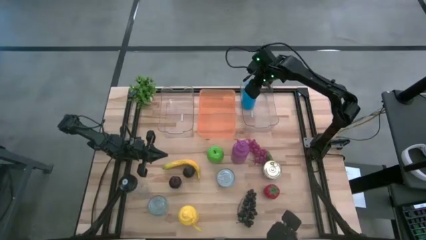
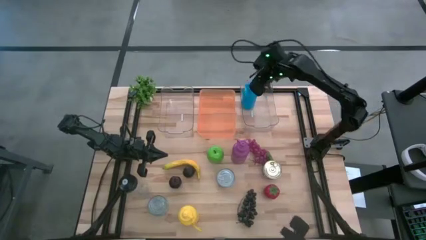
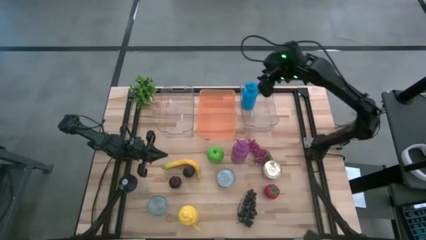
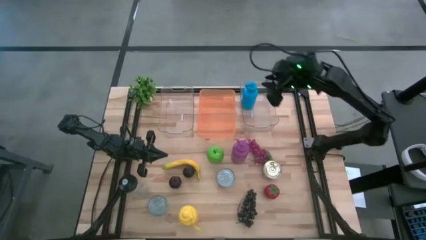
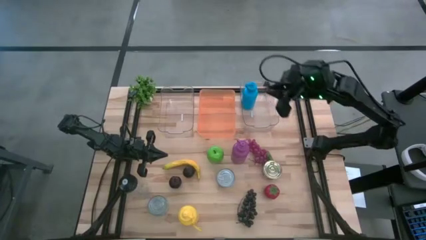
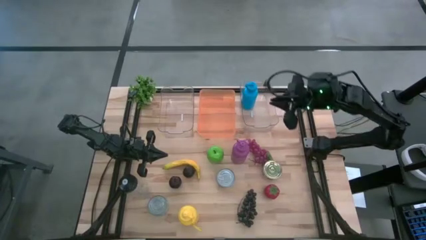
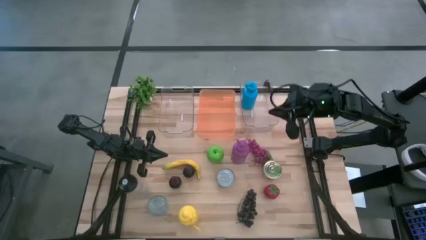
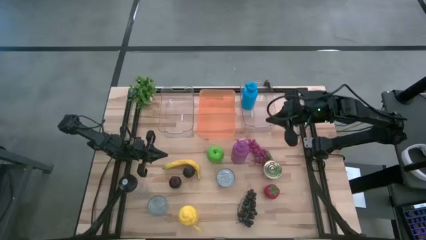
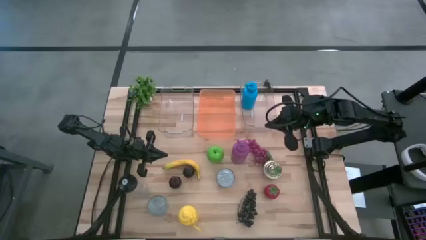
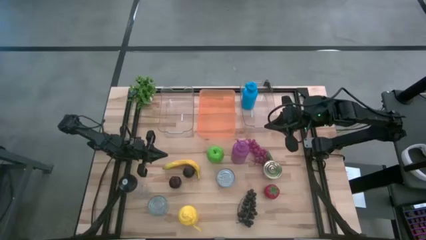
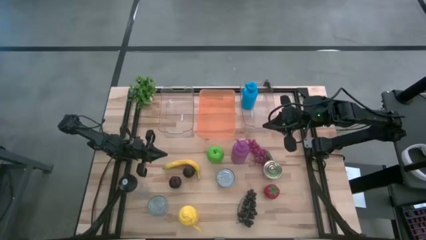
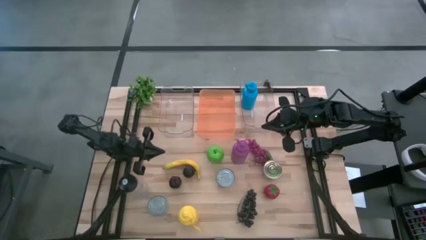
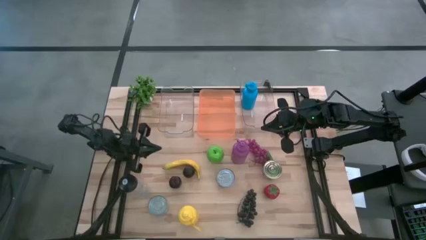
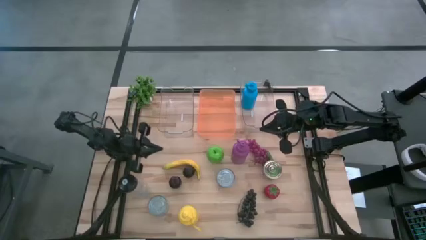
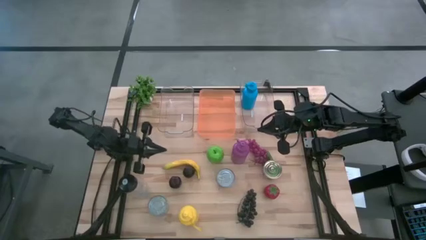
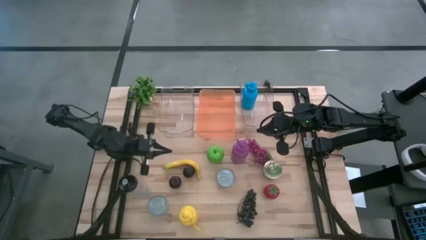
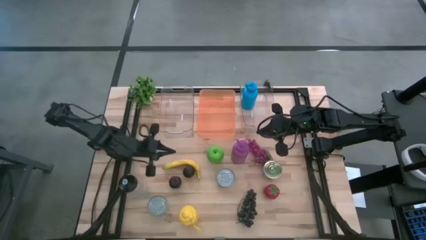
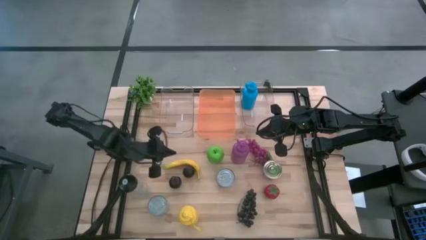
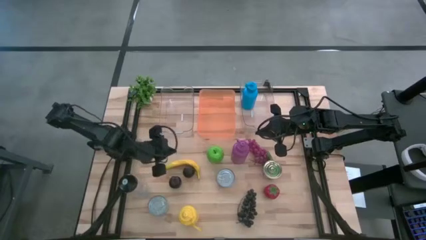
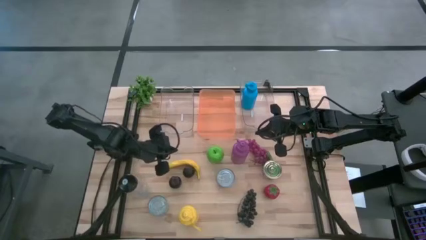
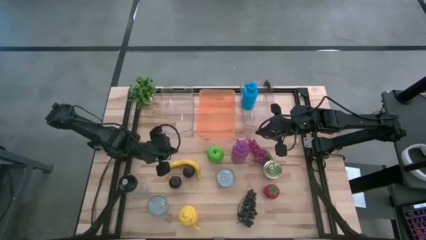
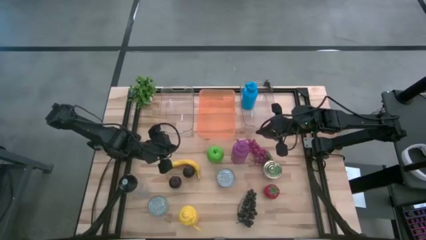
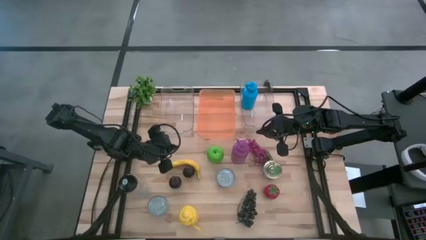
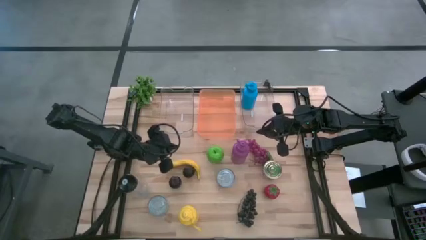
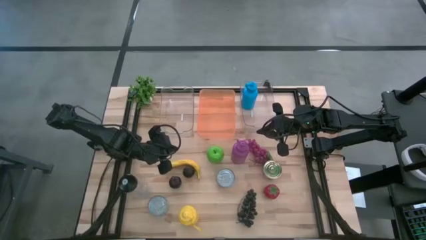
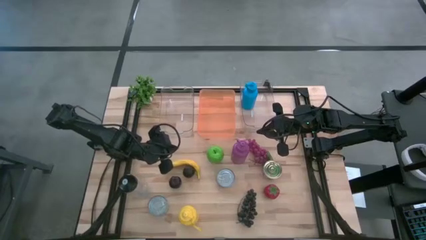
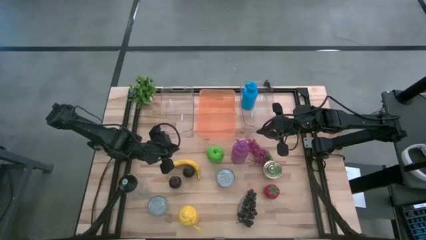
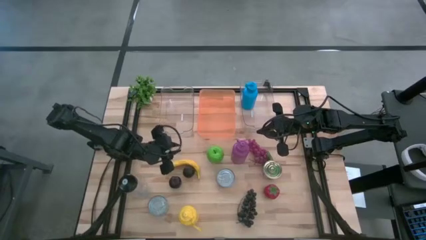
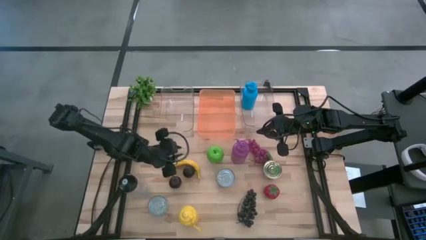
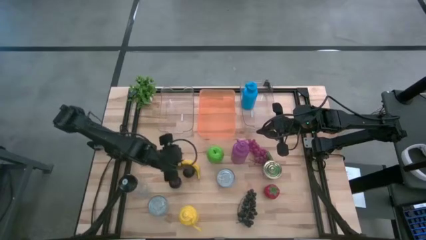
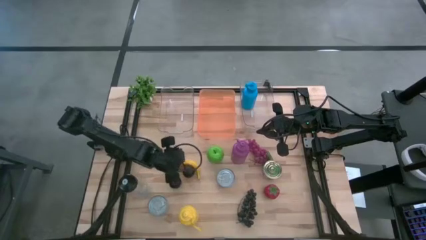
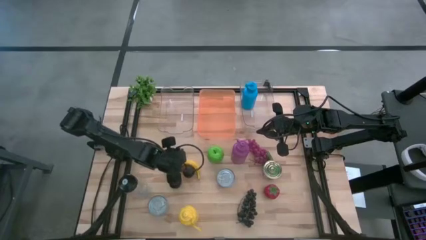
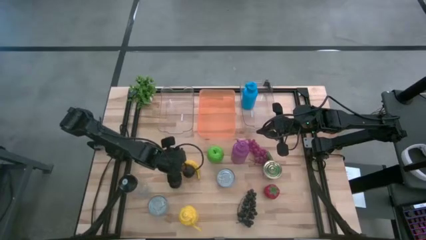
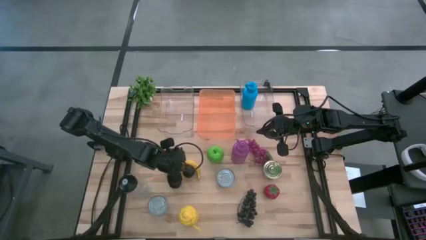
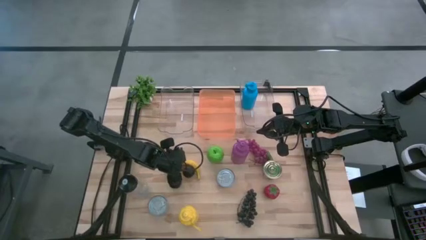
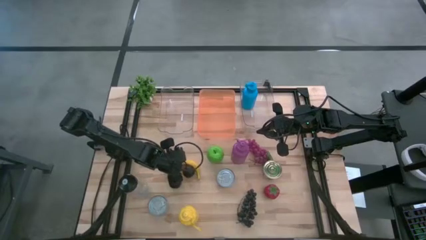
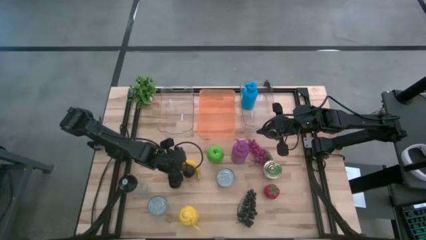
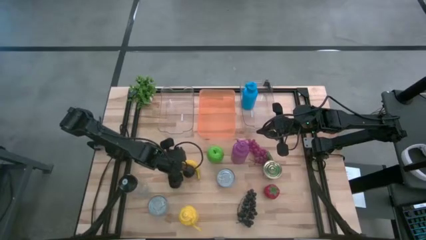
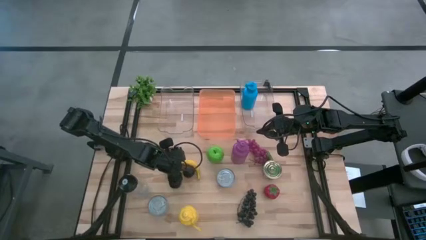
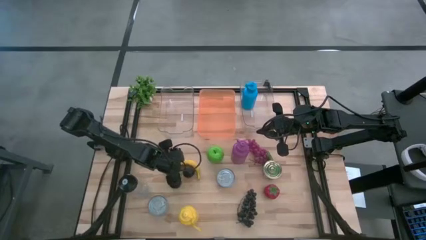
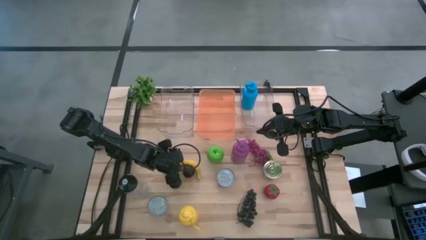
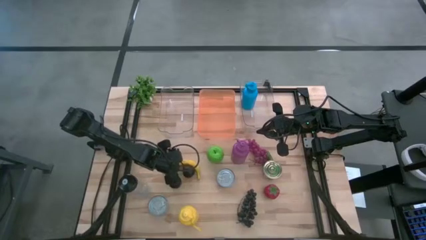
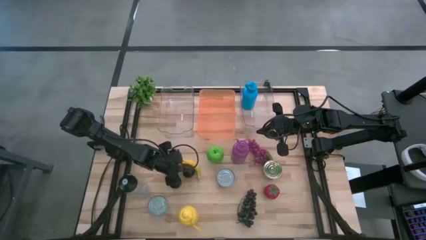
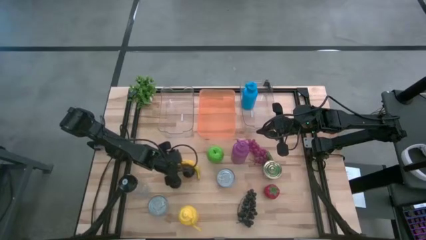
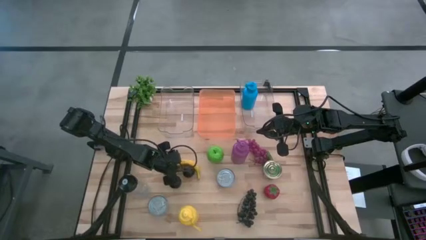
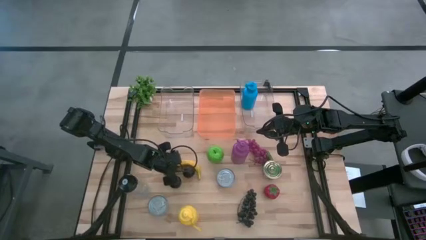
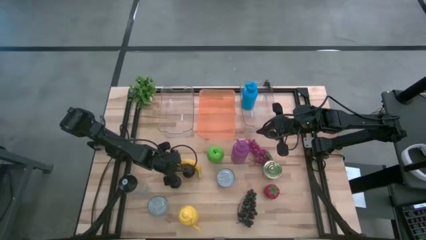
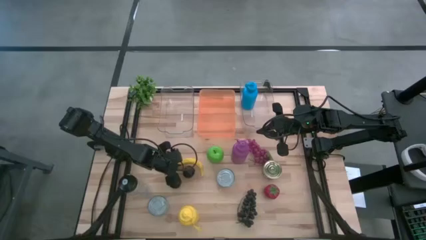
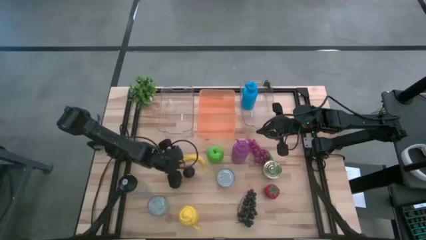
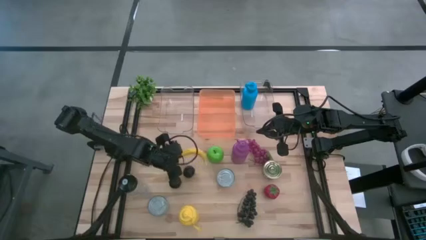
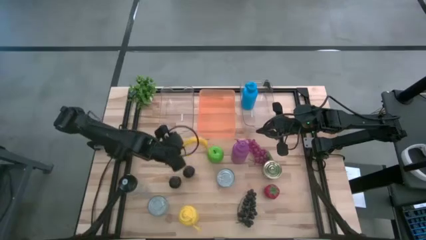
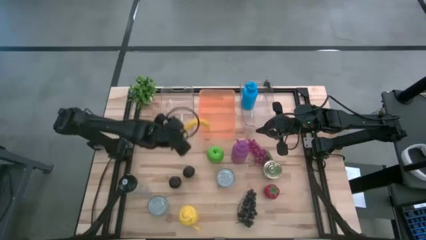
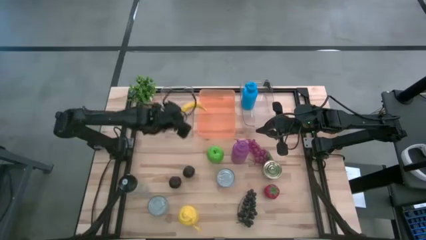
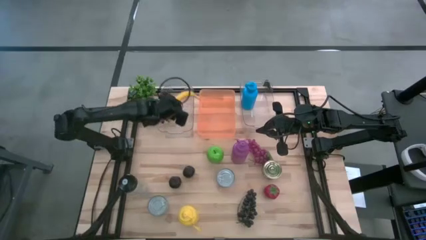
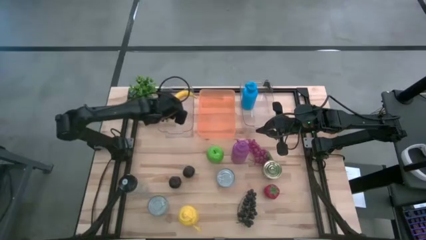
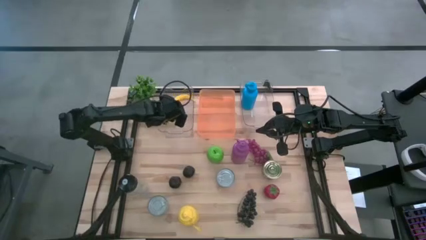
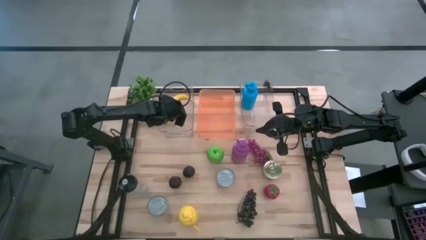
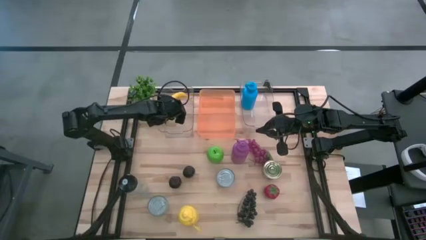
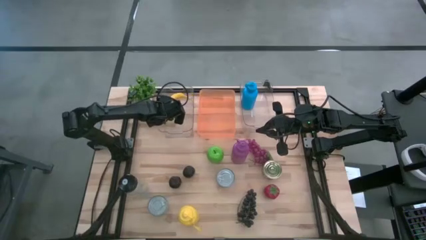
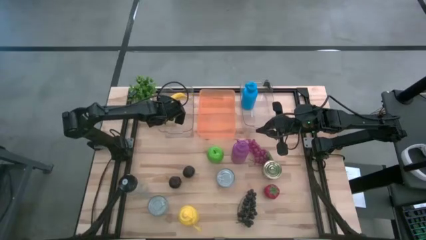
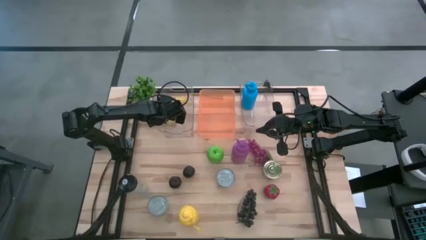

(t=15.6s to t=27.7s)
Task: Pick & Place Food Item
Put the yellow banana into the left transparent bin

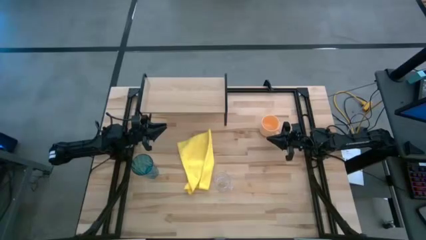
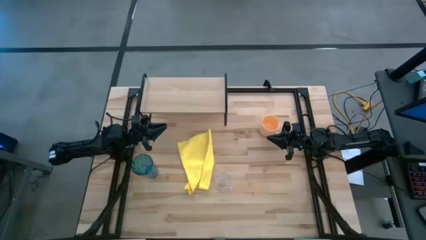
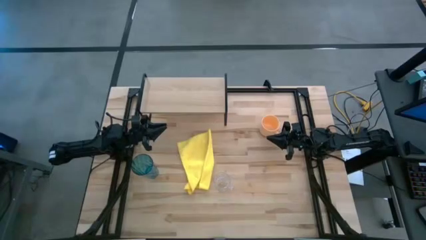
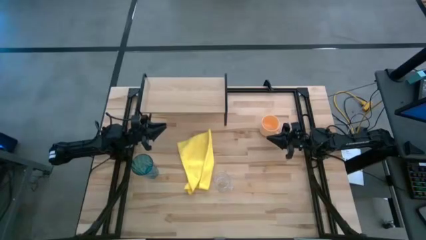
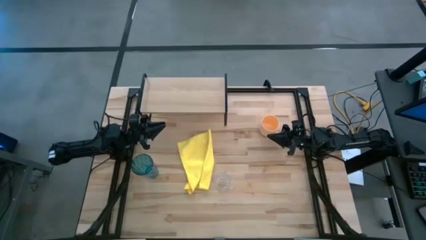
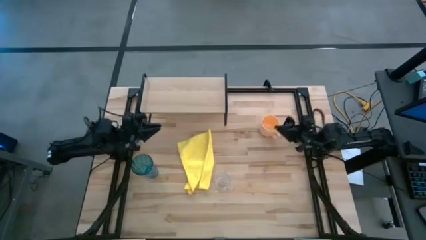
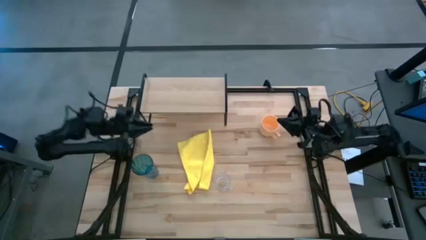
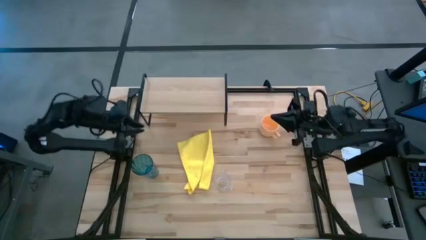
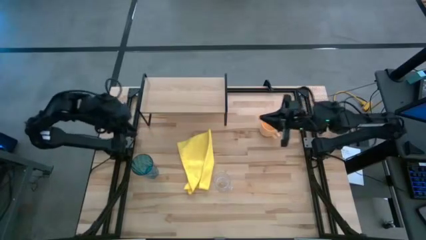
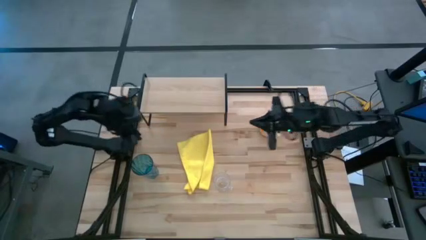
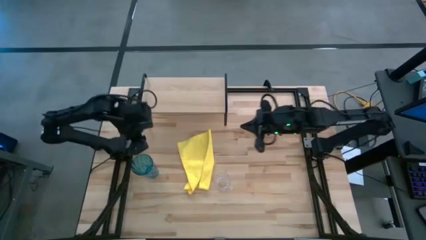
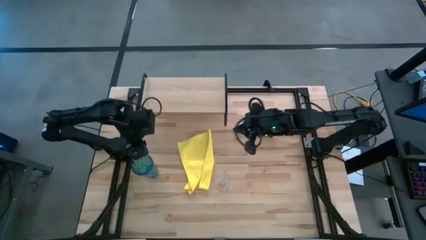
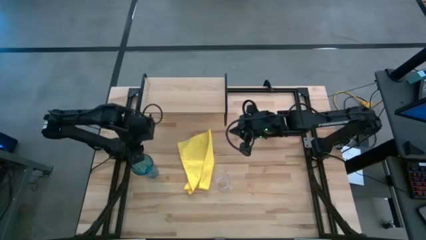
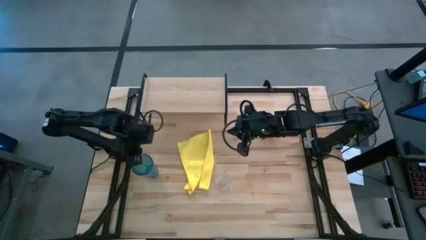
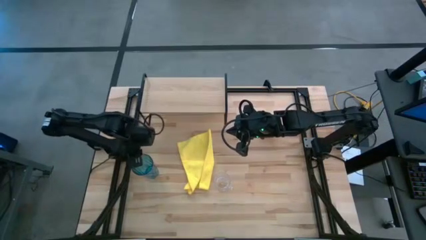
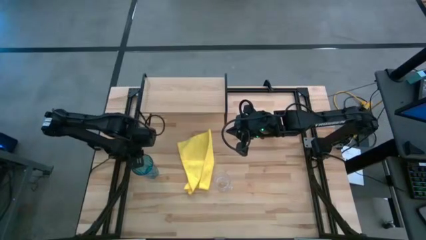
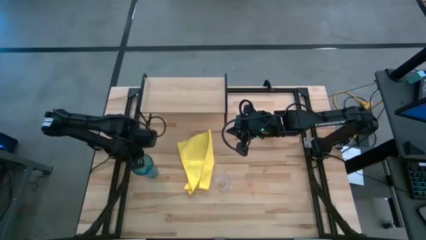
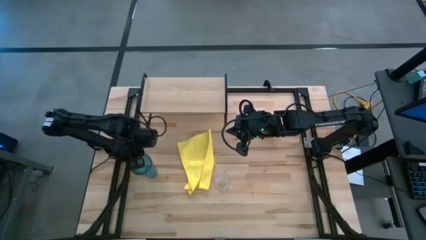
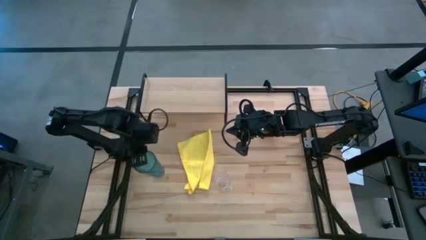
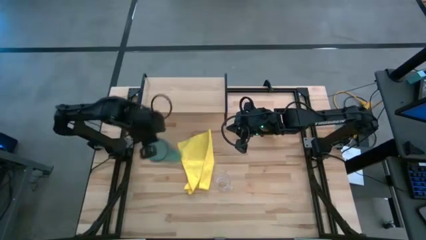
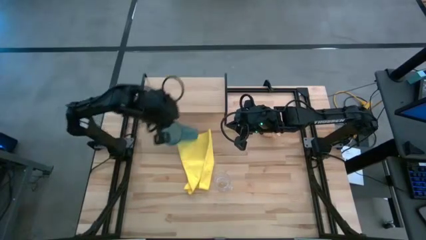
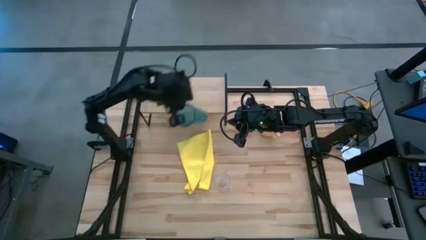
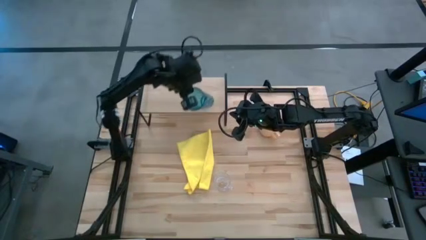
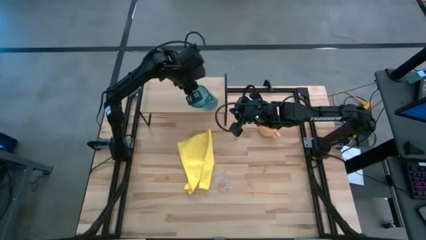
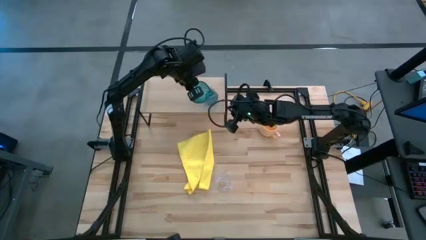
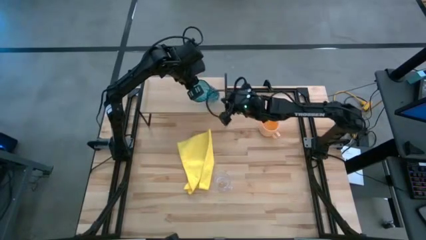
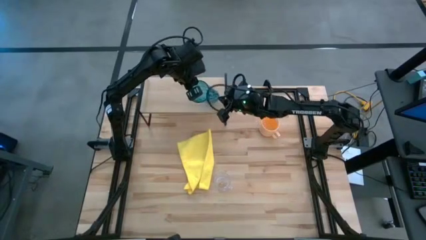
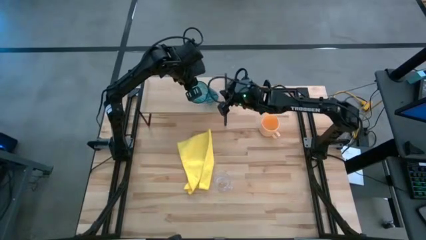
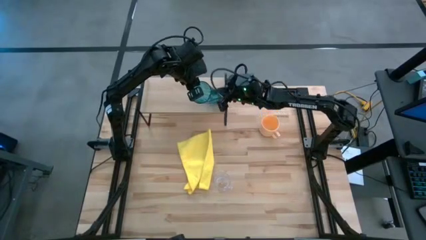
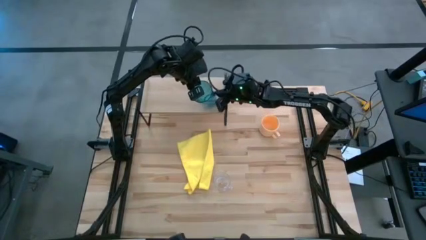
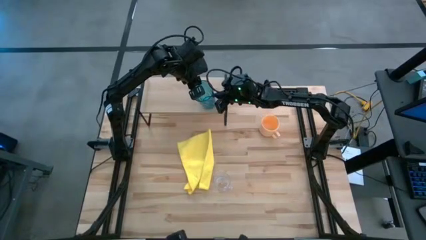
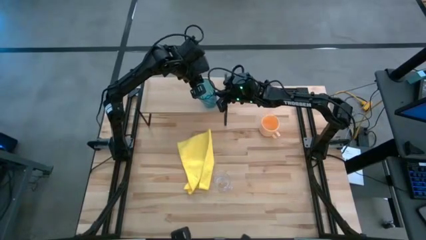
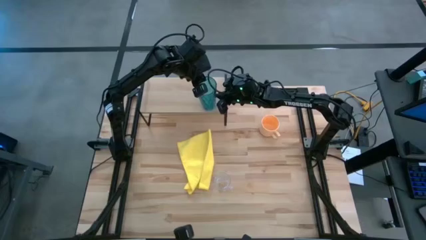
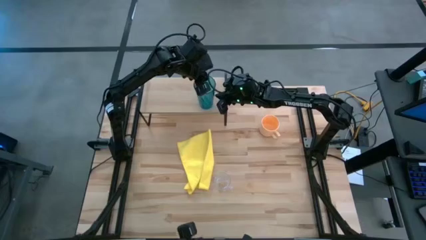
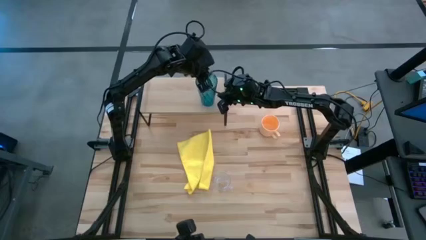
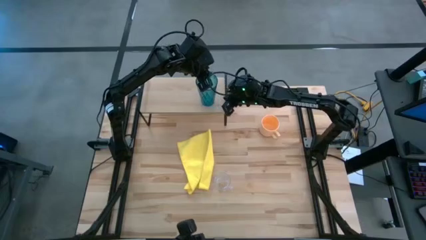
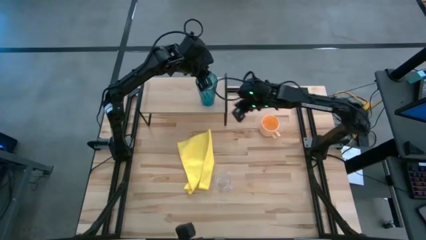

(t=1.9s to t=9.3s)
Task: Stack small to large cups/mugs on shelf
Put the blue cup on the shelf
